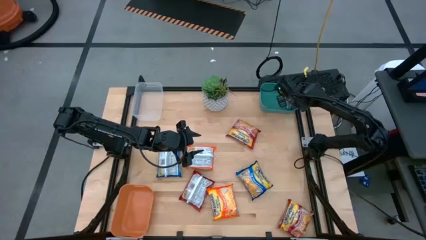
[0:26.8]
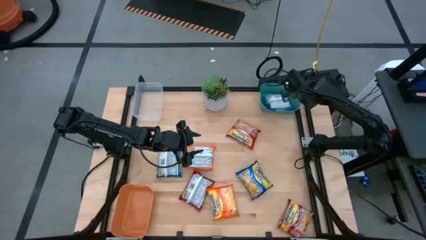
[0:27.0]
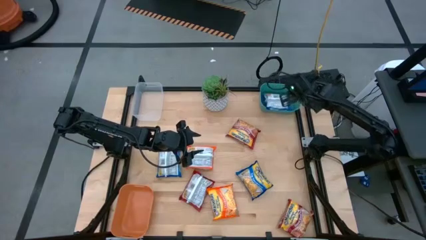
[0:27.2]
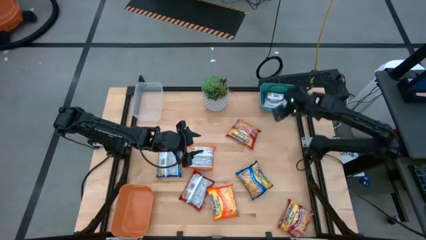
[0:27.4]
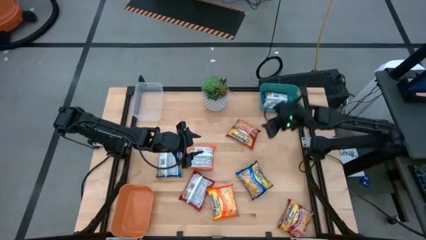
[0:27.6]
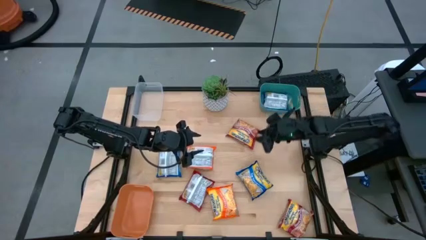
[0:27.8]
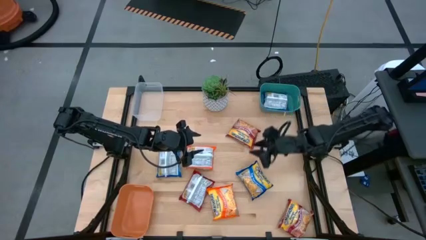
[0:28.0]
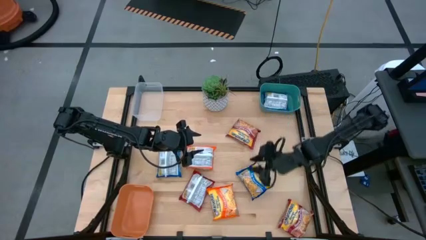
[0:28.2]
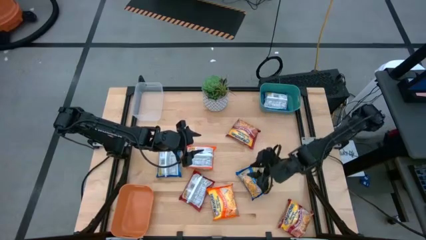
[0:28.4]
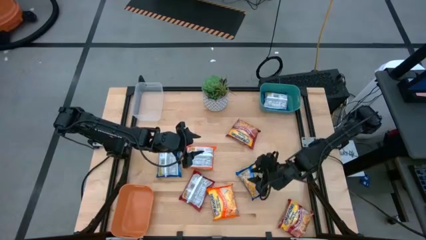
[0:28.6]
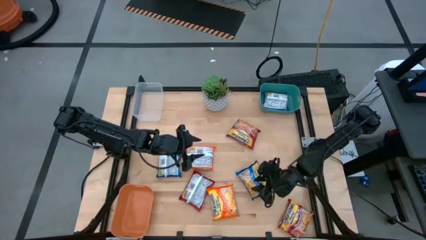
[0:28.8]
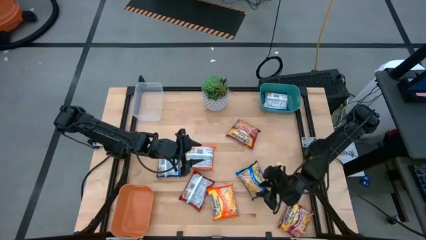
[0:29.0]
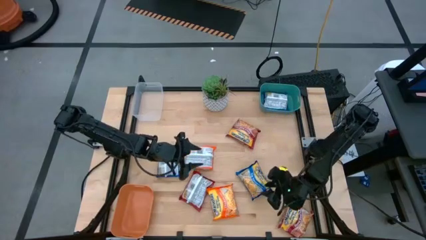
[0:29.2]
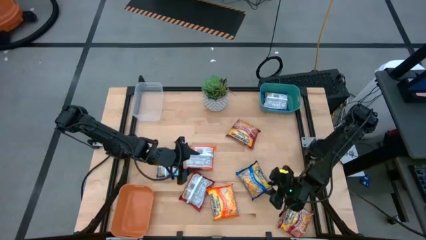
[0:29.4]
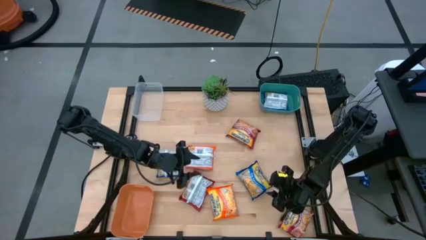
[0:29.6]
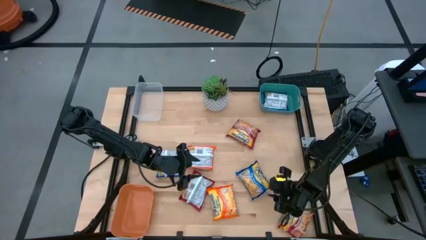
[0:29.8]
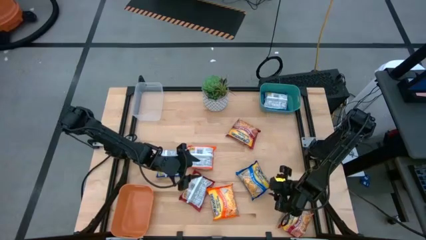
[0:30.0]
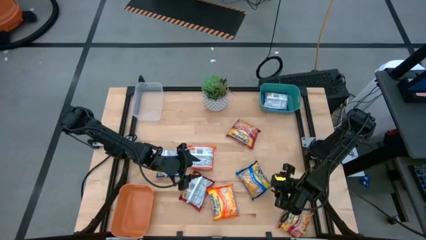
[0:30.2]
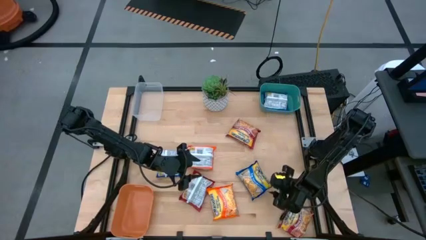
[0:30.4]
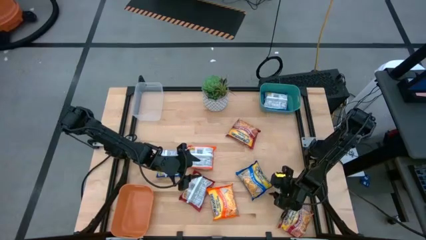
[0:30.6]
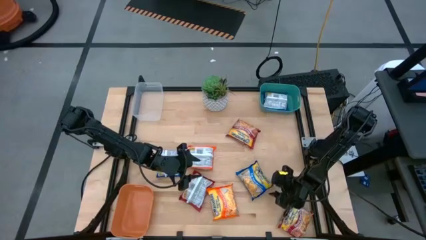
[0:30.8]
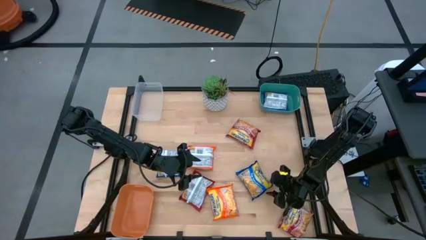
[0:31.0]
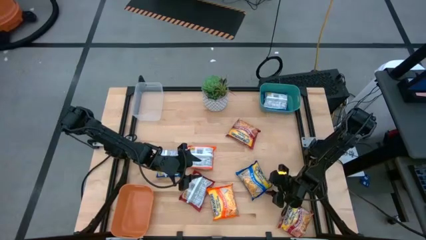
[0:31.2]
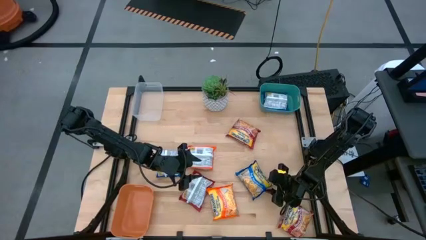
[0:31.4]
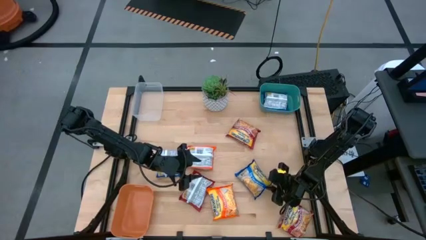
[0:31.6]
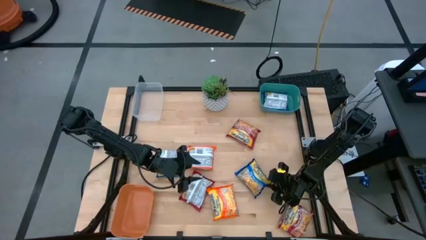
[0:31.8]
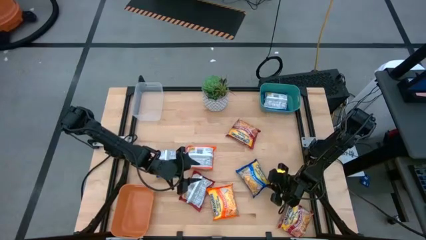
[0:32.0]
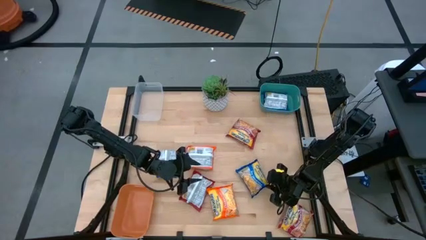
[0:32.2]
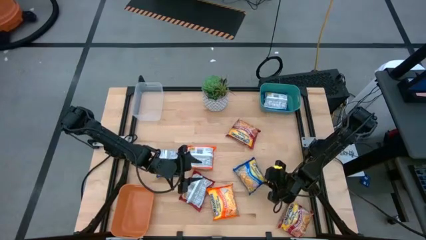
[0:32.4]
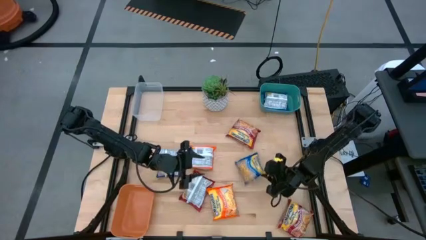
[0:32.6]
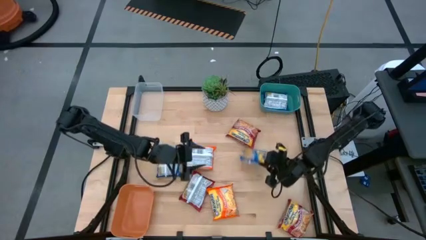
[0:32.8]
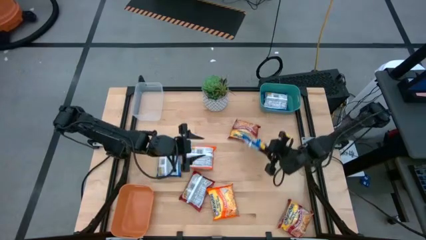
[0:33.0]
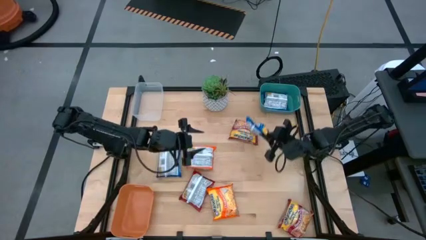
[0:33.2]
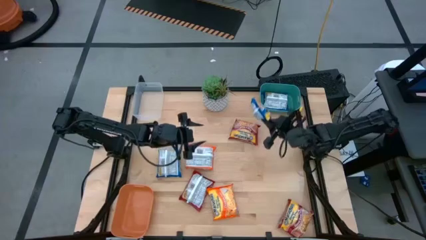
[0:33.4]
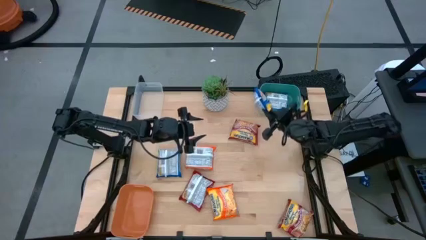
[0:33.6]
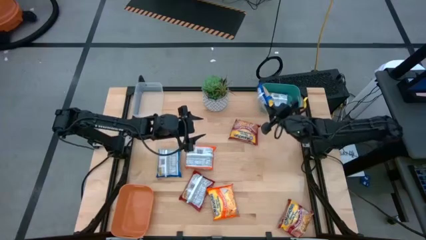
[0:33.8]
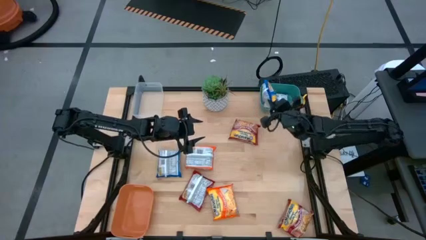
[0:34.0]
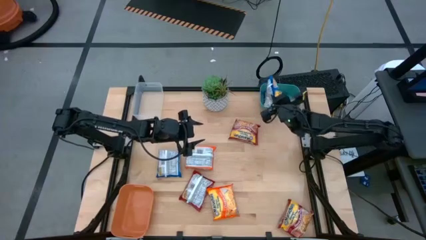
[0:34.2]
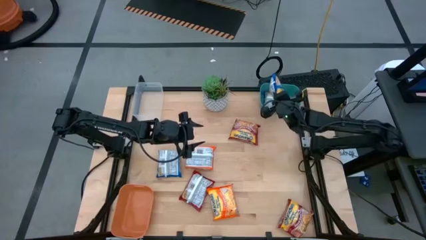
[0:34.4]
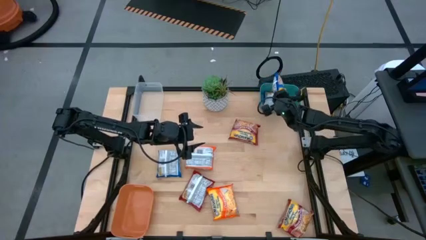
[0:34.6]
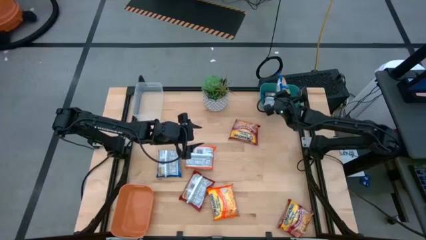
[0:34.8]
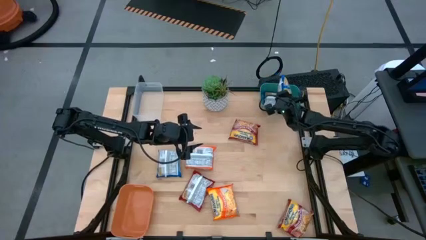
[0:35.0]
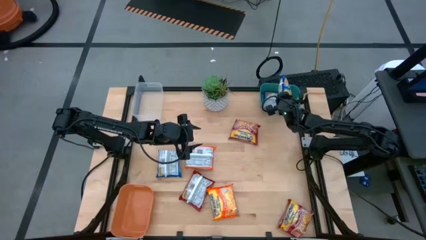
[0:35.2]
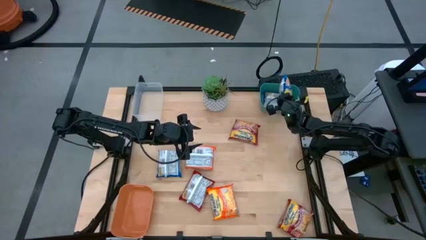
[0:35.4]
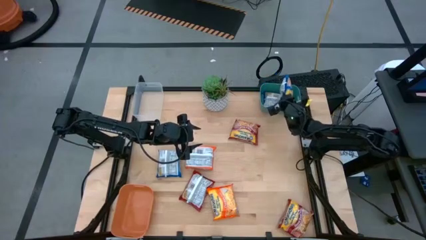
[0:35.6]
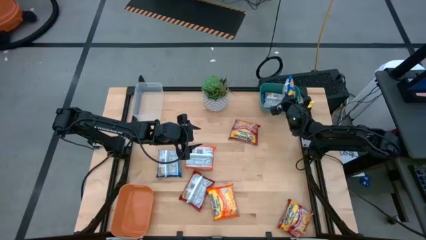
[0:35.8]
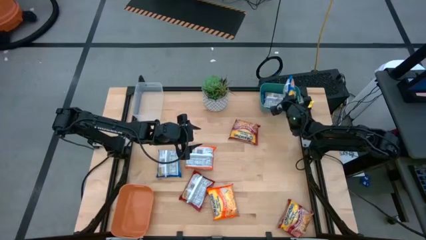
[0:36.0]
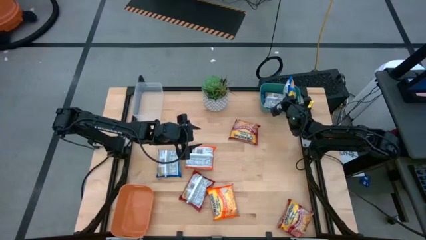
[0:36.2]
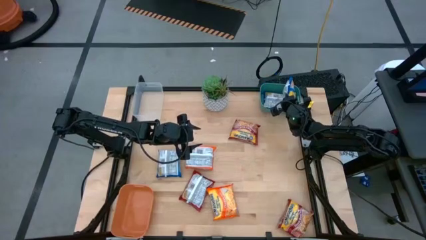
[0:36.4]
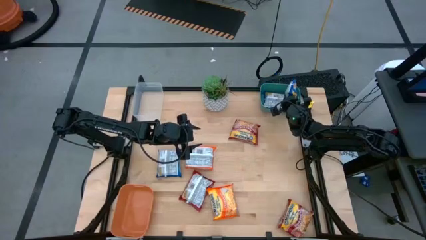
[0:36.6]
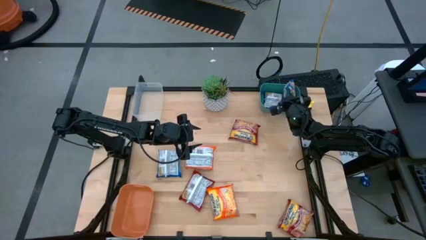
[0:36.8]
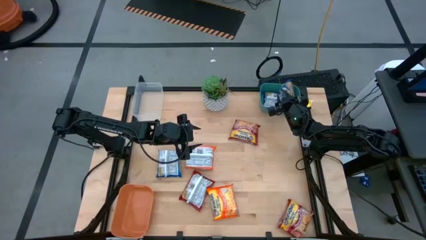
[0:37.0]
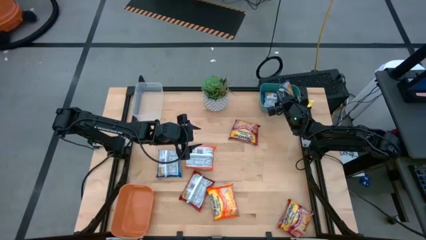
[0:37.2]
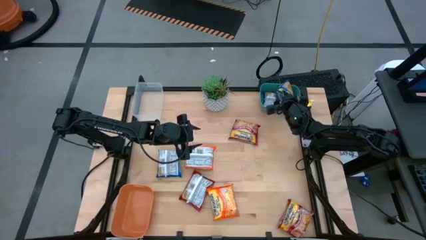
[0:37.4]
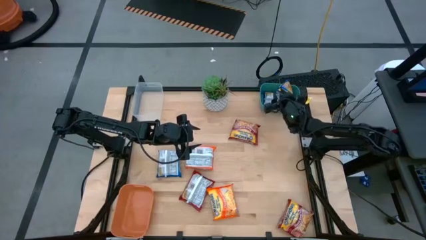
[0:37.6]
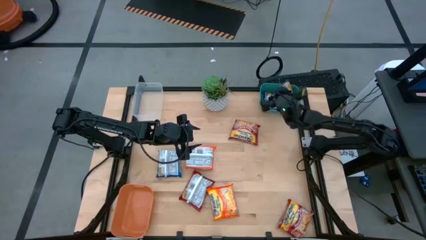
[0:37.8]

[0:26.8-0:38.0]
Task: Sort Maruchan noodles
Put the right blue noodle pack into the green bin
